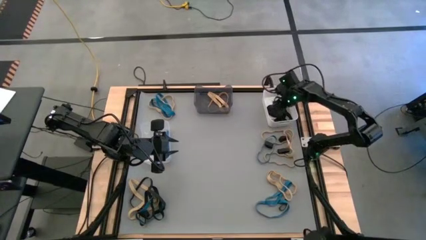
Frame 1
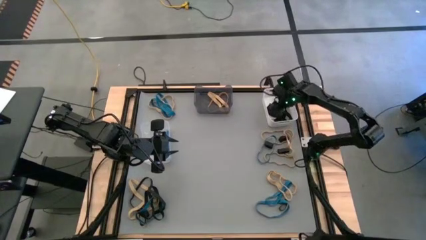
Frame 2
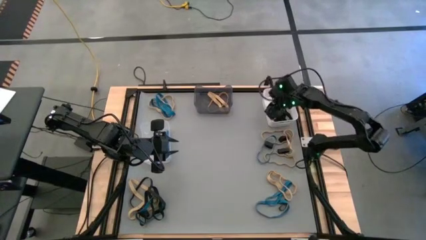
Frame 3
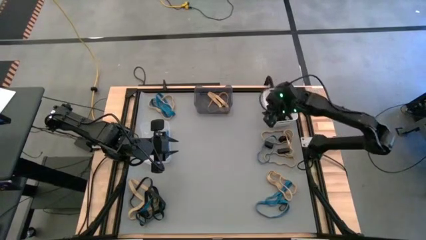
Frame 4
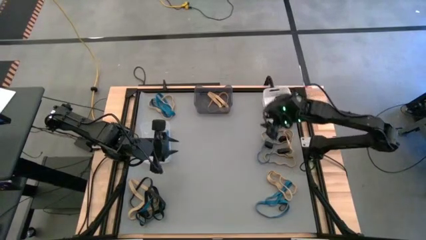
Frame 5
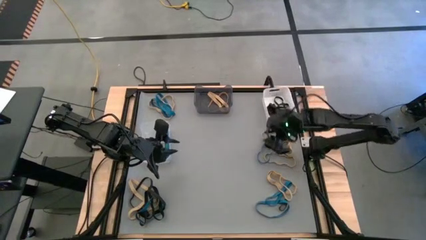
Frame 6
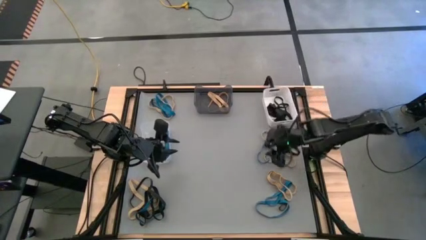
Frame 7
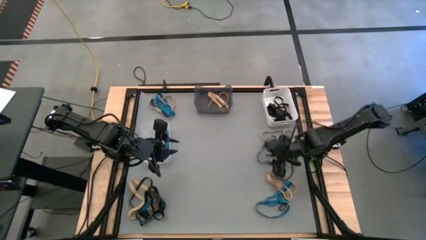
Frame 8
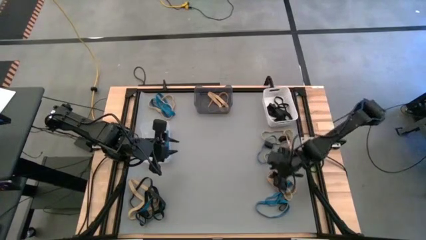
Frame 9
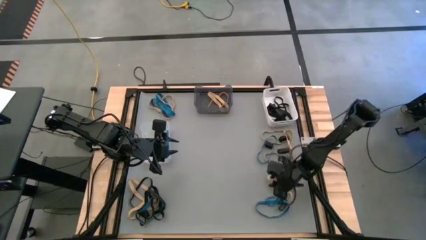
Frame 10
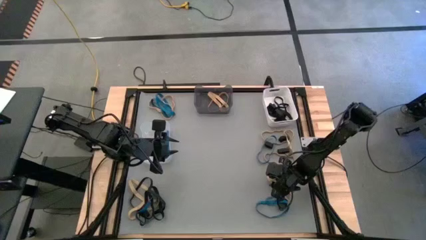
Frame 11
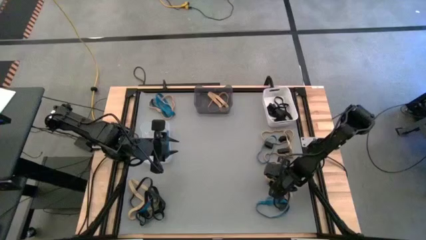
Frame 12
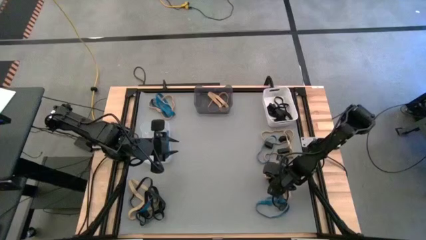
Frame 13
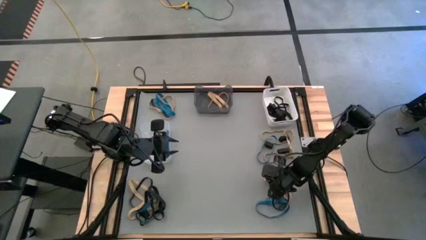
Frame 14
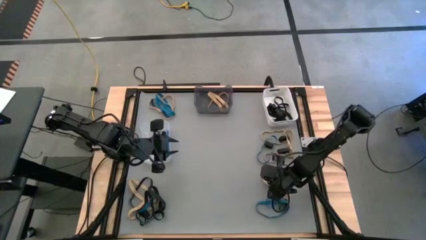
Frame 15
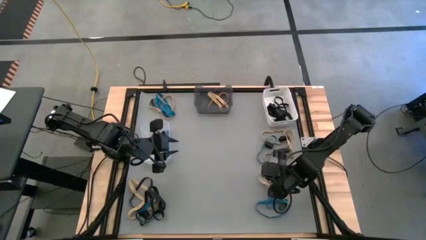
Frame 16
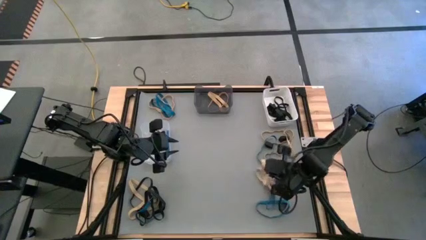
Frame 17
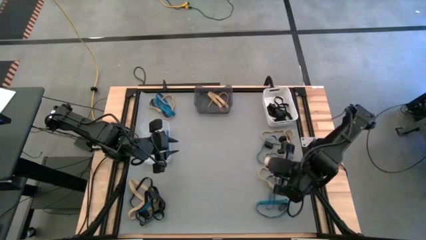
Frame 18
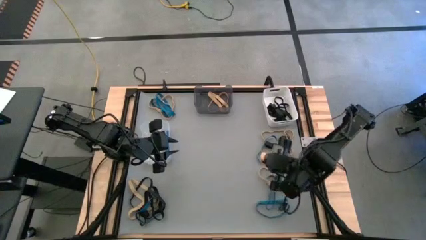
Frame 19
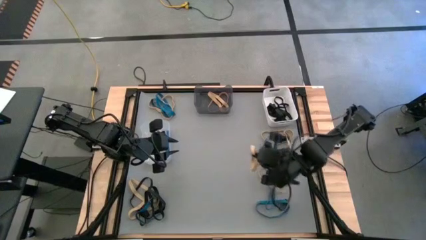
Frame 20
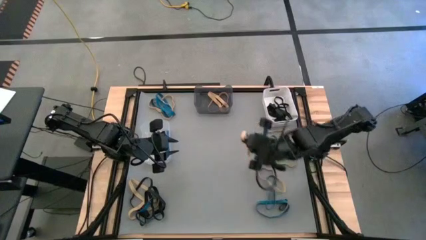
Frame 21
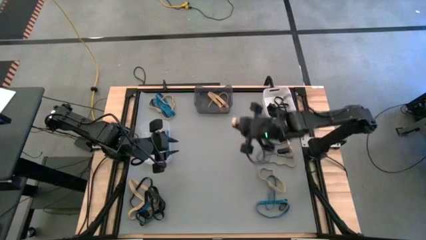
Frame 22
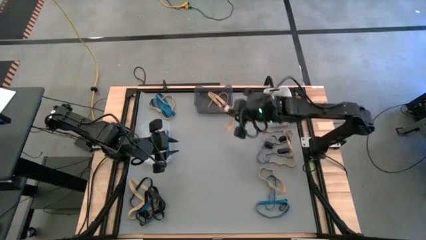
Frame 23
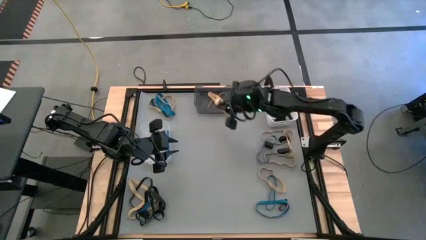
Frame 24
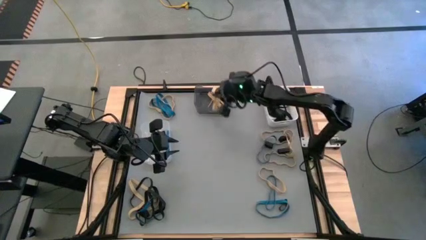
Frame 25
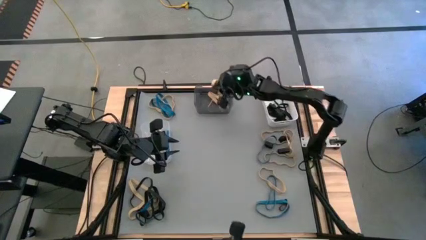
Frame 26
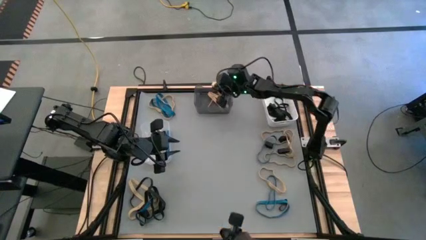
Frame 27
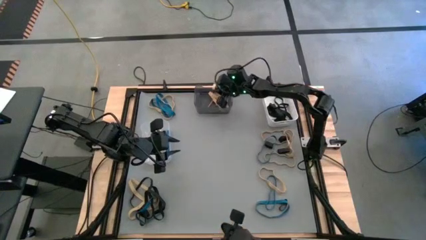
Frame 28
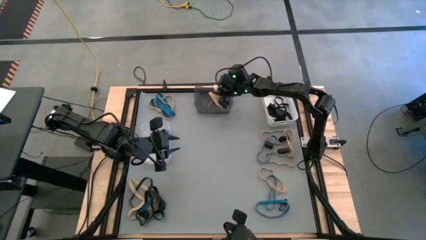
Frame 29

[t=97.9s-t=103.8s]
Task: Sort rubber bands into baskets
Put the brown rubber band into the black bin

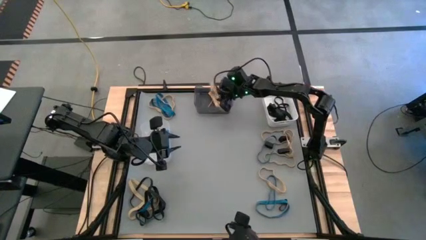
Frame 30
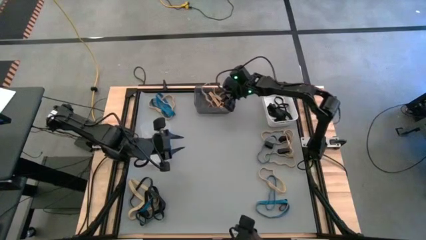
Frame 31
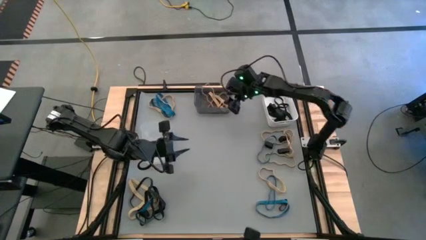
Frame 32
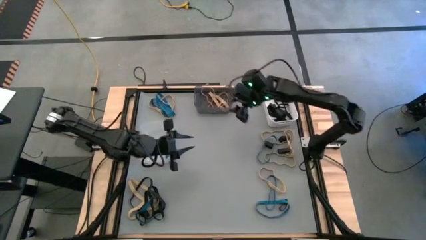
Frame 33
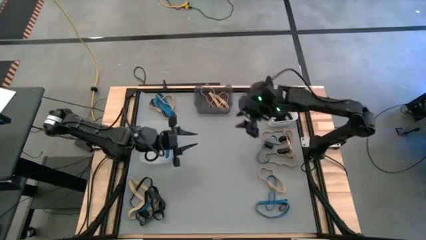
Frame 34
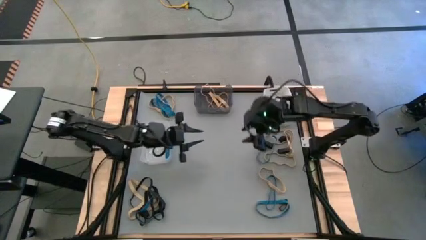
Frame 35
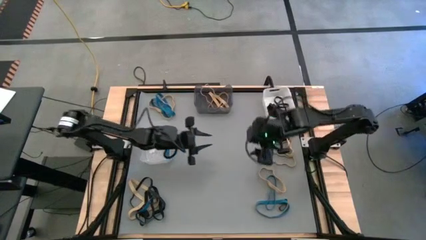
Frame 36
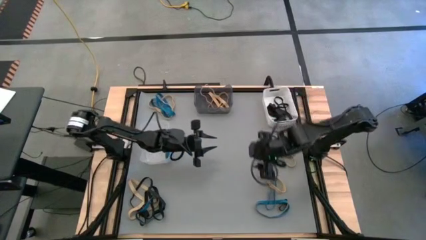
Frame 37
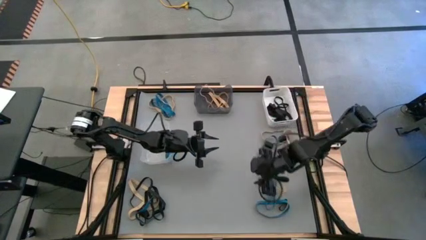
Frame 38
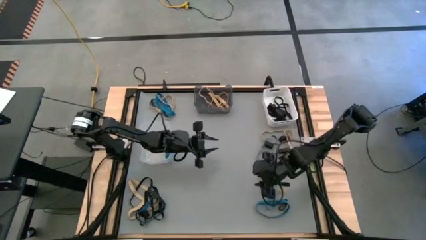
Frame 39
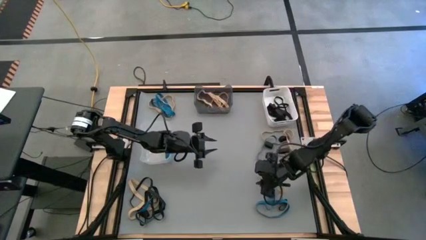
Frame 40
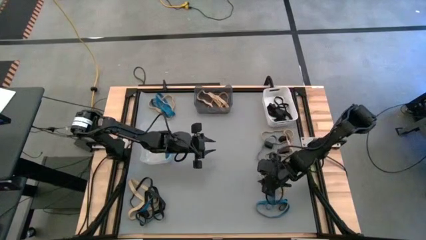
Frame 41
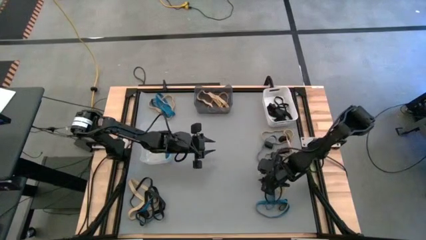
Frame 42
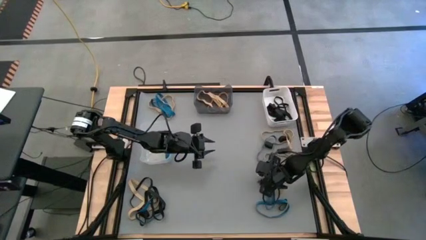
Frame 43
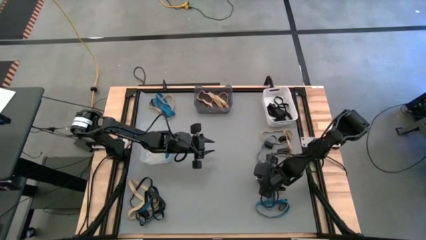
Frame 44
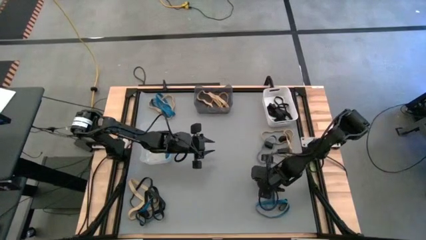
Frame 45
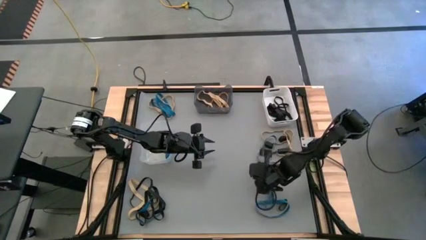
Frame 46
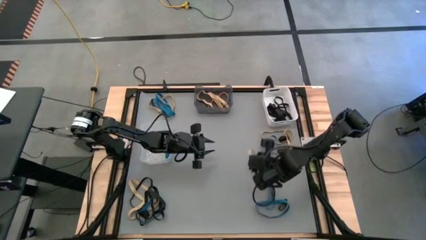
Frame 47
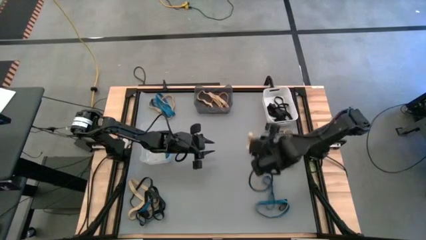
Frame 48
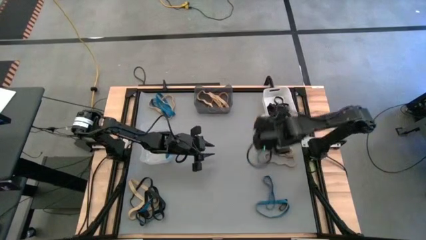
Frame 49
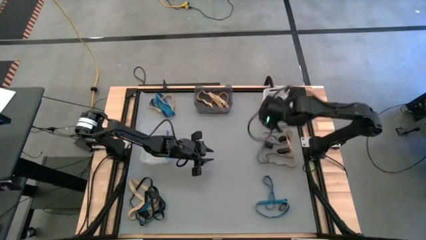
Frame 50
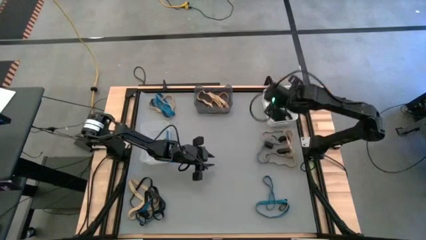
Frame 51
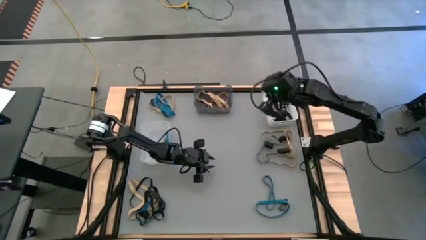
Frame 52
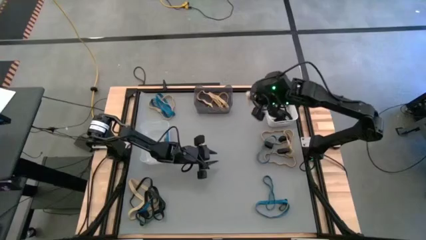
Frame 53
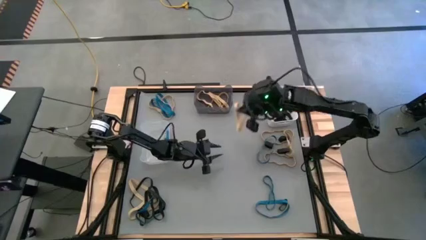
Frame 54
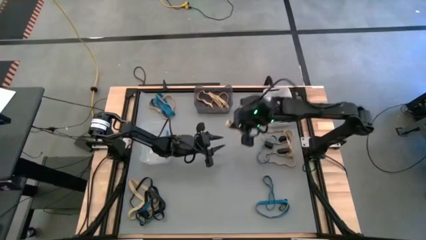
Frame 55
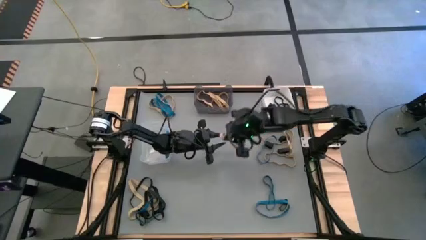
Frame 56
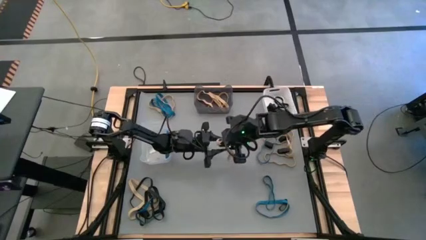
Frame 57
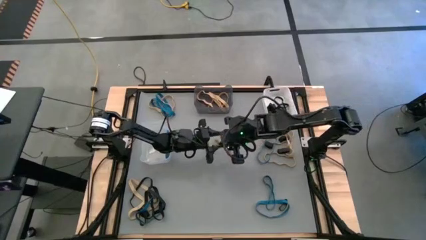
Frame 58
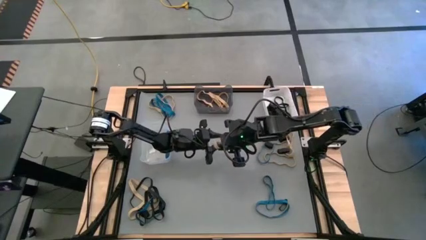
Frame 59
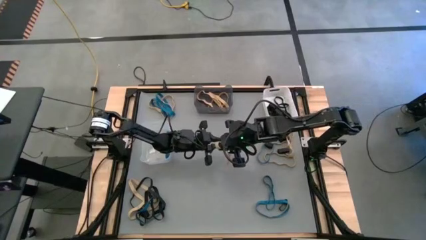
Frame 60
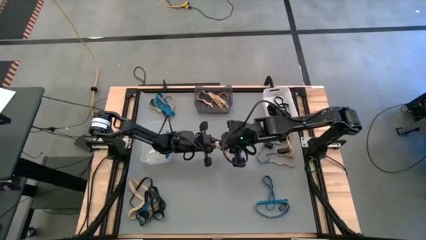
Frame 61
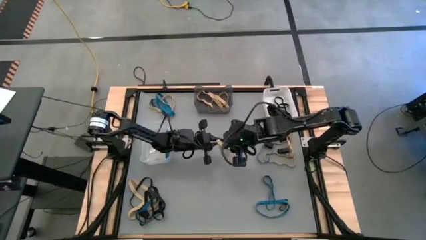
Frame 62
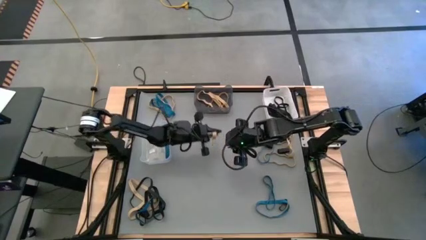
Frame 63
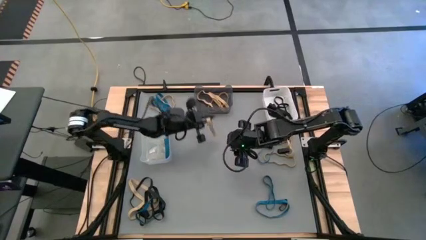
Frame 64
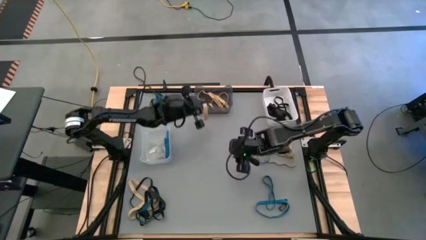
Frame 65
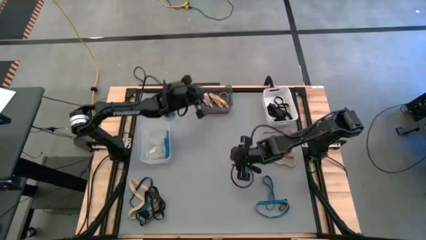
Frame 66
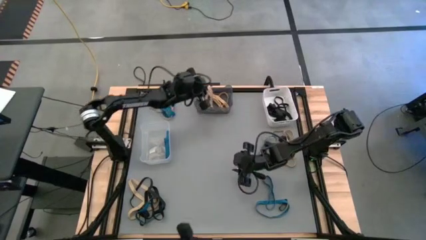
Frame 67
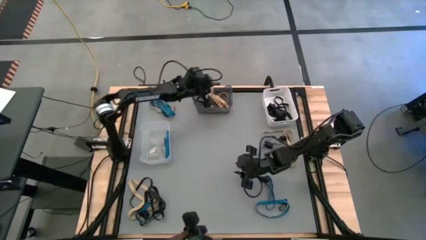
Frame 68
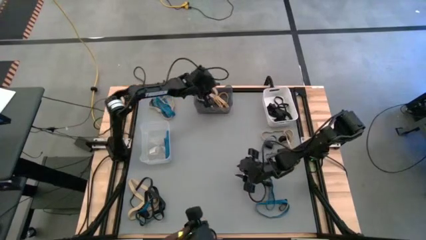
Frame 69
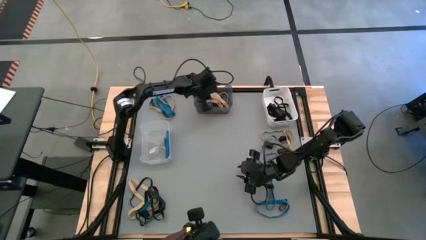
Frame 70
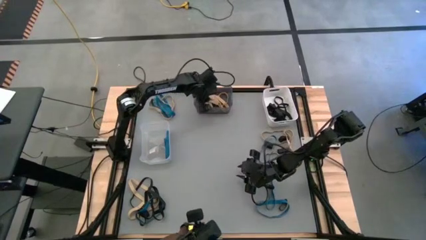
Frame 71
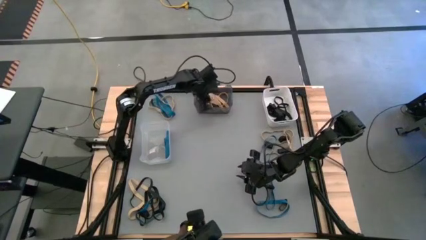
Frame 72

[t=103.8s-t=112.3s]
Put the brown rubber band into the black bin

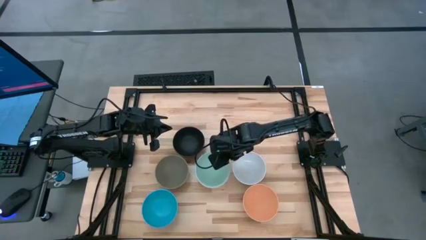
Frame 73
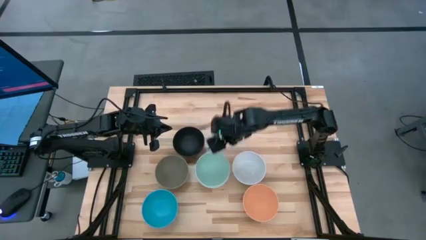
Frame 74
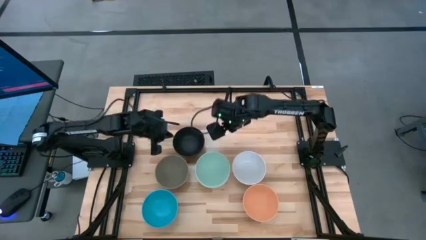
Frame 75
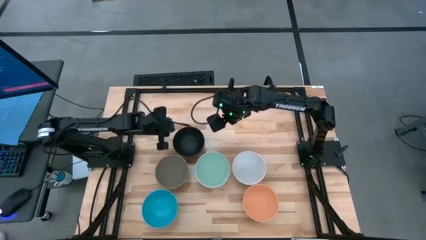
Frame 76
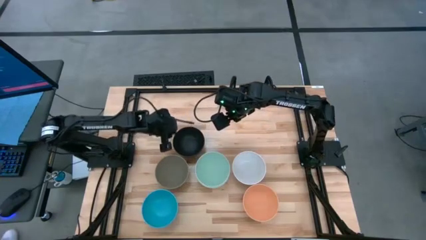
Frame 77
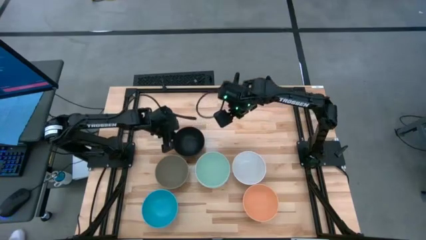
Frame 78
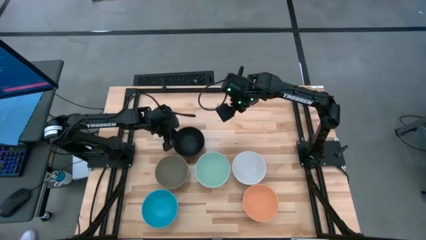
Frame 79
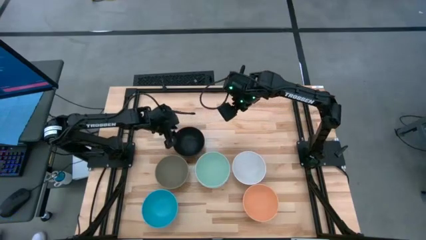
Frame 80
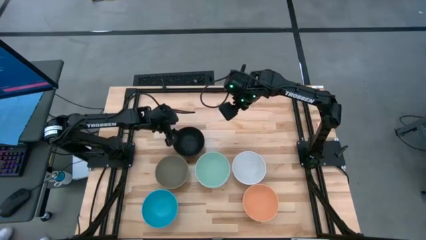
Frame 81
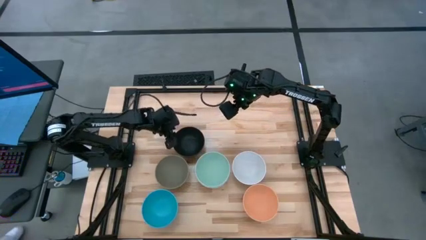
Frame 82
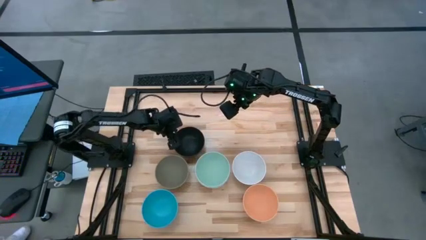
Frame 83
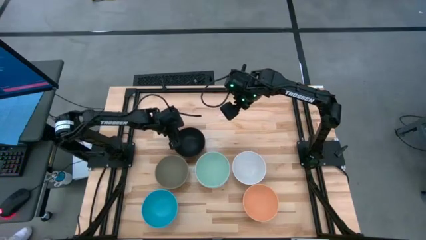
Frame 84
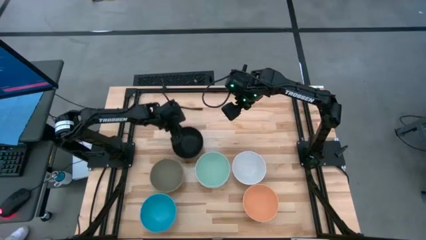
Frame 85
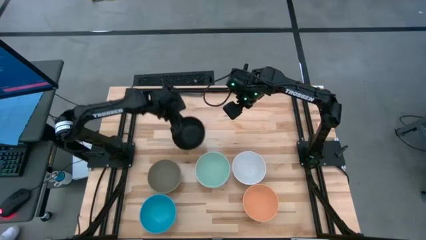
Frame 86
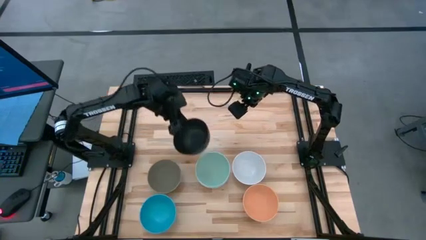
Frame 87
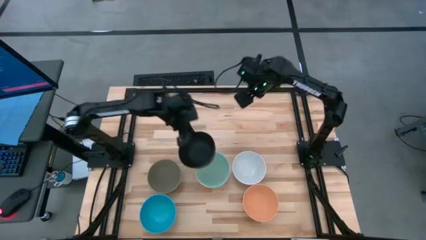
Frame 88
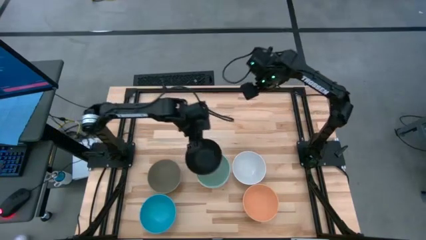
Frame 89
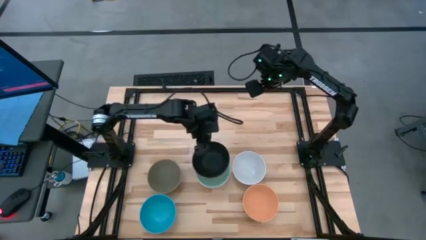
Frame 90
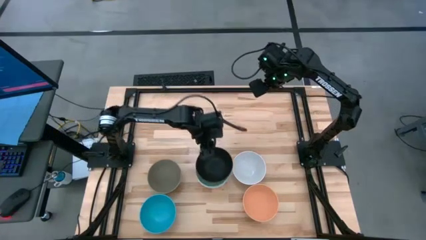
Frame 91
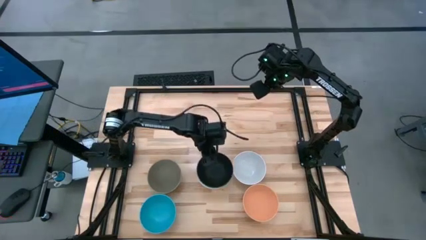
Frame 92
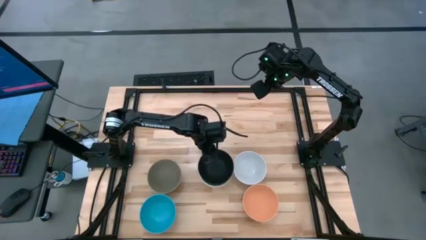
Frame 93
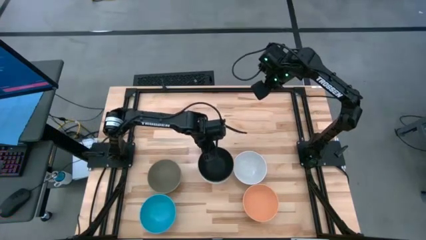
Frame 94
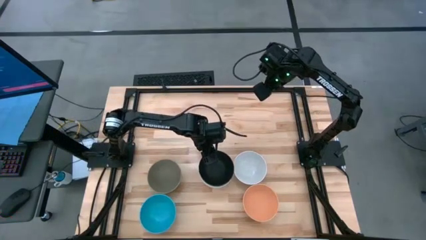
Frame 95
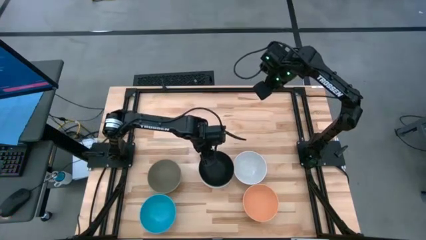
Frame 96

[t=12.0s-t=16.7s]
Task: Nest bowls inside each other
Stack the black bowl on top of the light green bowl
